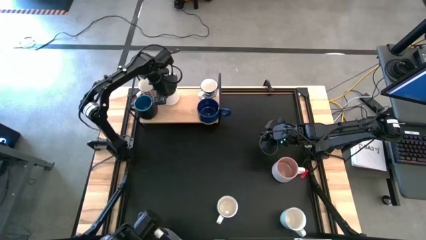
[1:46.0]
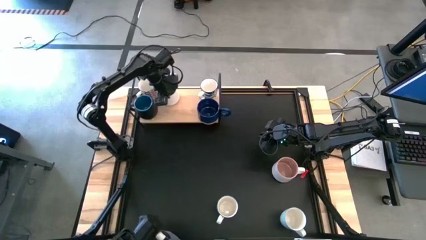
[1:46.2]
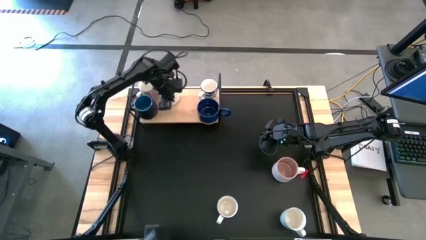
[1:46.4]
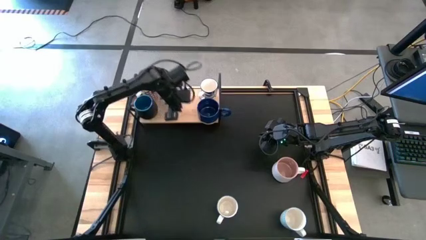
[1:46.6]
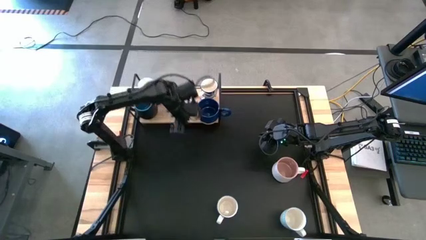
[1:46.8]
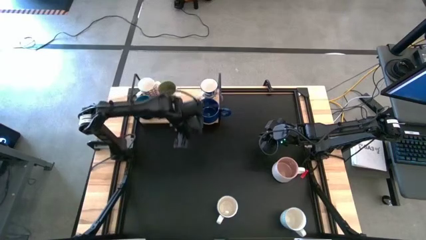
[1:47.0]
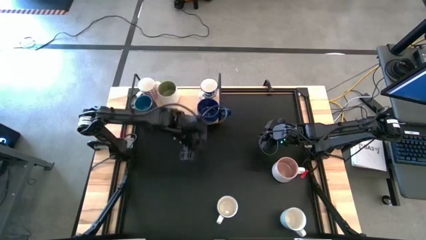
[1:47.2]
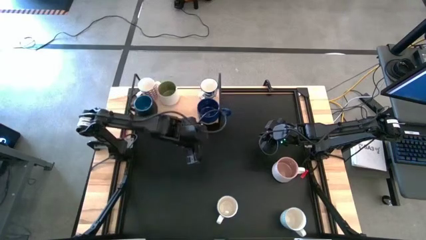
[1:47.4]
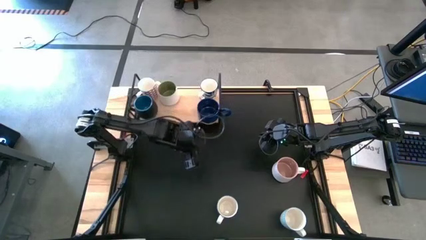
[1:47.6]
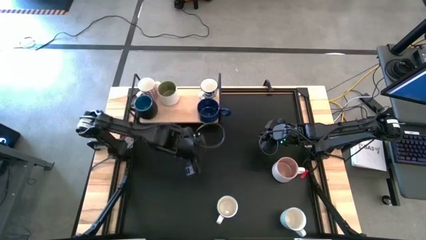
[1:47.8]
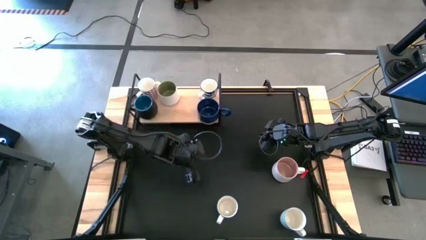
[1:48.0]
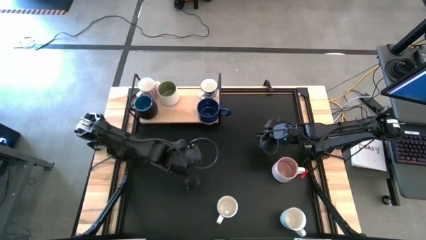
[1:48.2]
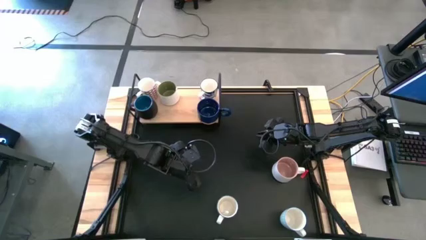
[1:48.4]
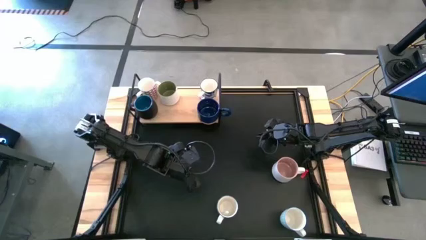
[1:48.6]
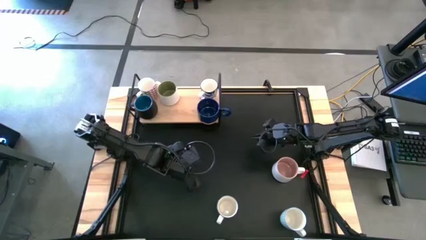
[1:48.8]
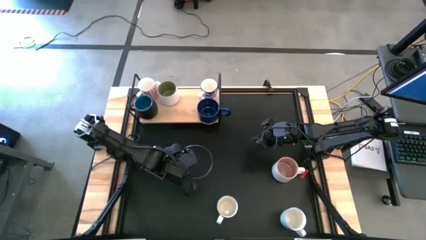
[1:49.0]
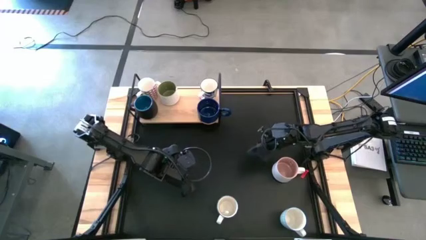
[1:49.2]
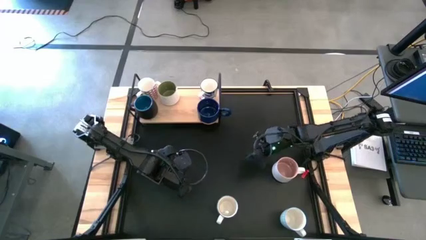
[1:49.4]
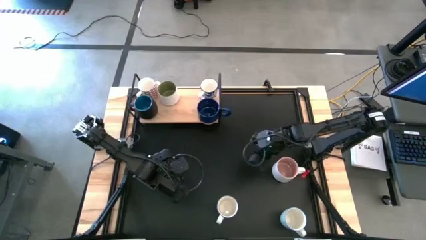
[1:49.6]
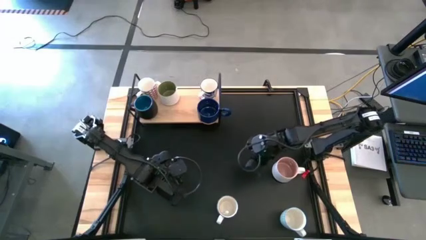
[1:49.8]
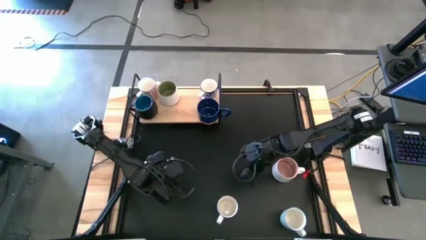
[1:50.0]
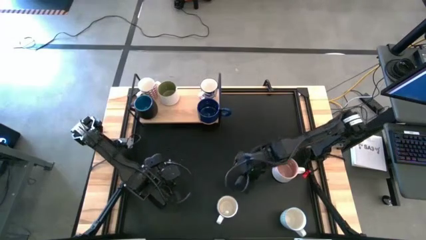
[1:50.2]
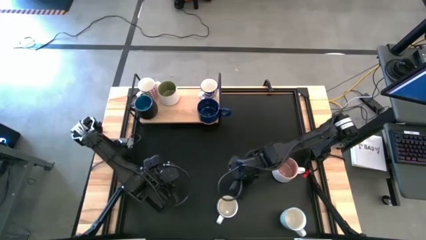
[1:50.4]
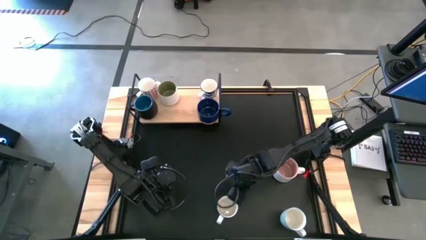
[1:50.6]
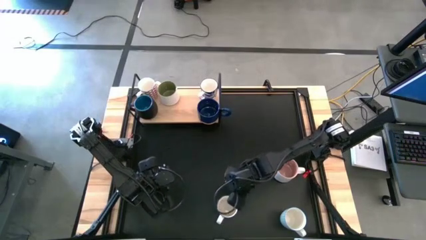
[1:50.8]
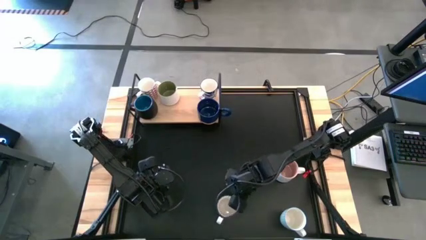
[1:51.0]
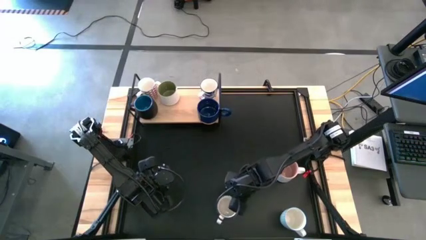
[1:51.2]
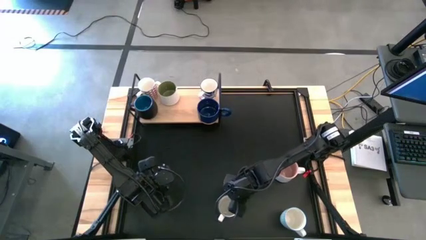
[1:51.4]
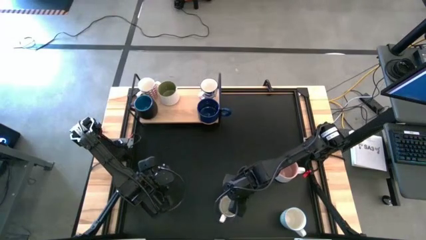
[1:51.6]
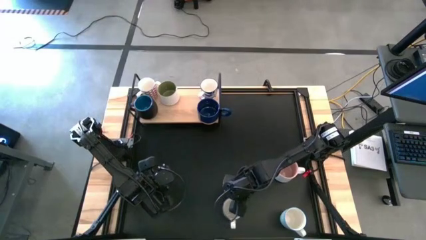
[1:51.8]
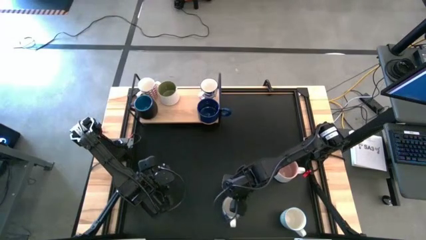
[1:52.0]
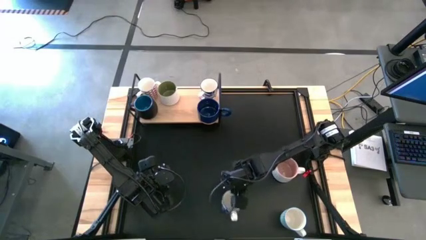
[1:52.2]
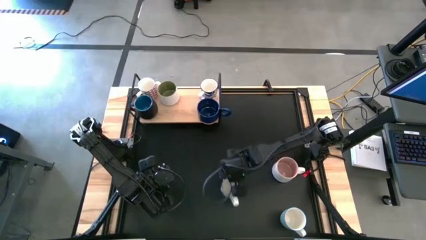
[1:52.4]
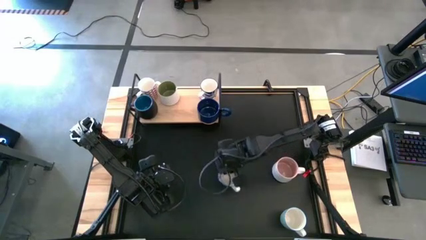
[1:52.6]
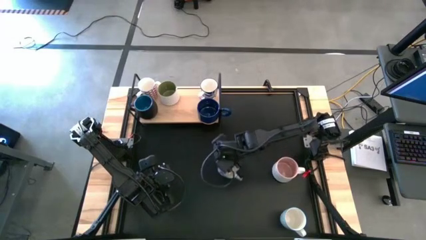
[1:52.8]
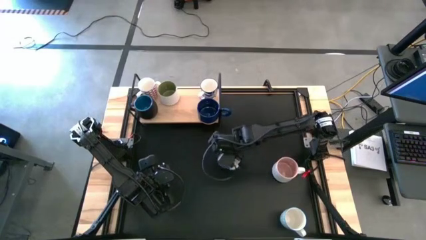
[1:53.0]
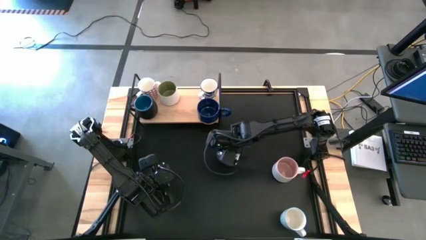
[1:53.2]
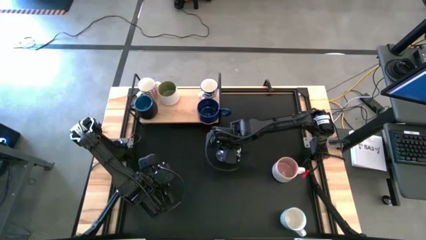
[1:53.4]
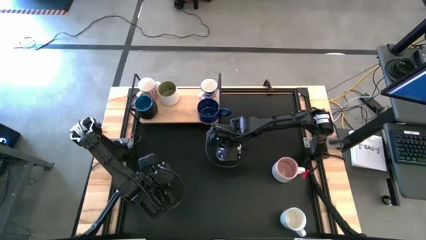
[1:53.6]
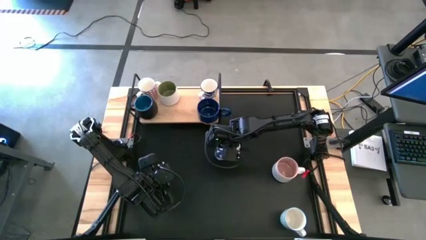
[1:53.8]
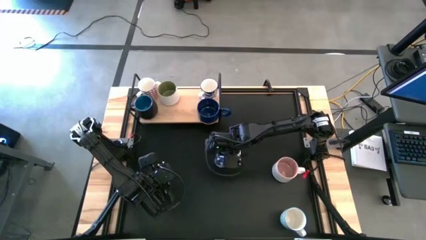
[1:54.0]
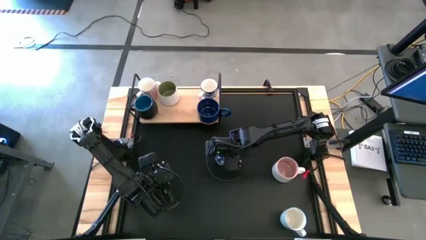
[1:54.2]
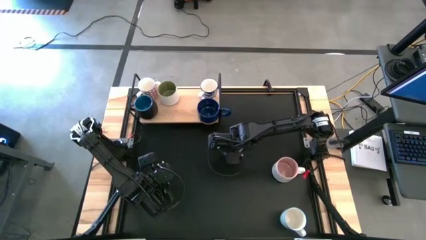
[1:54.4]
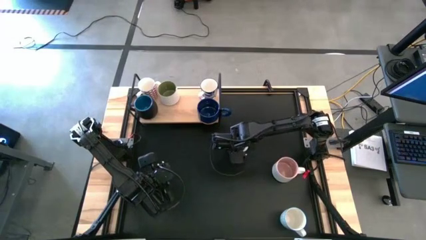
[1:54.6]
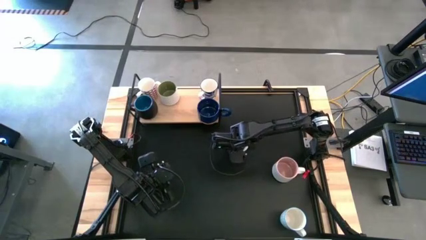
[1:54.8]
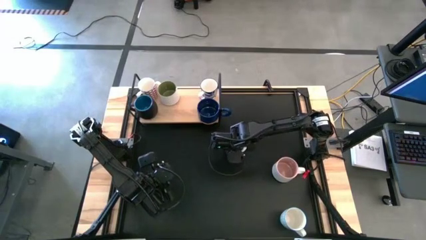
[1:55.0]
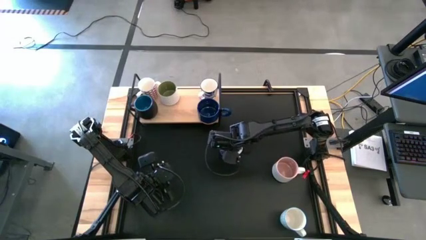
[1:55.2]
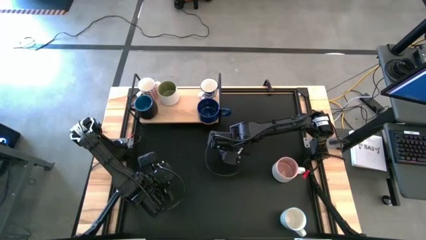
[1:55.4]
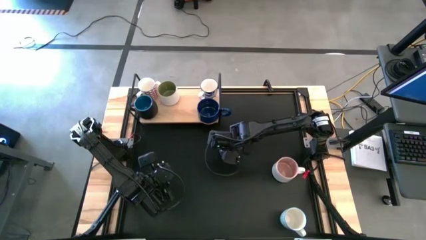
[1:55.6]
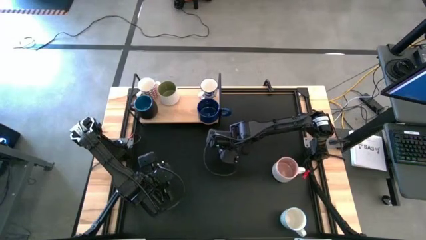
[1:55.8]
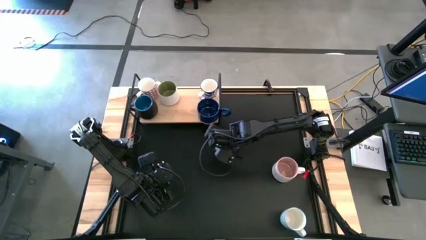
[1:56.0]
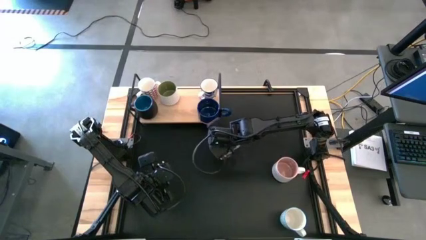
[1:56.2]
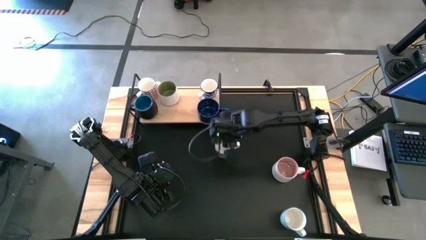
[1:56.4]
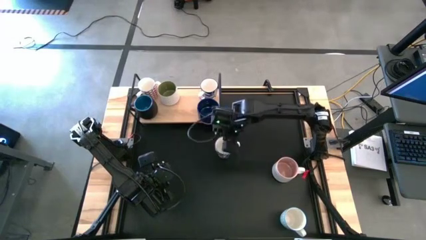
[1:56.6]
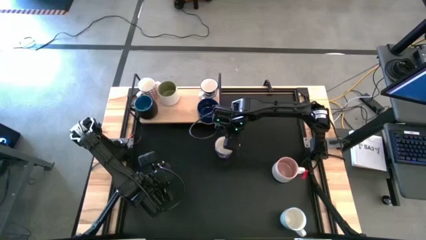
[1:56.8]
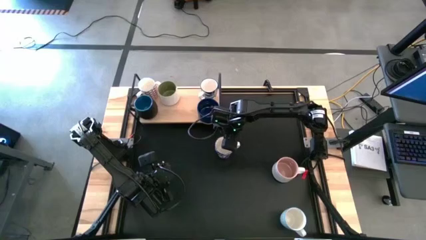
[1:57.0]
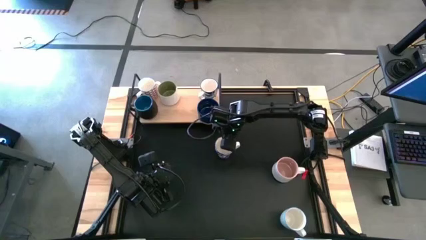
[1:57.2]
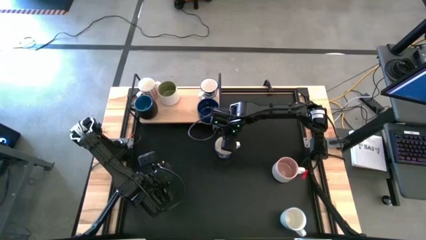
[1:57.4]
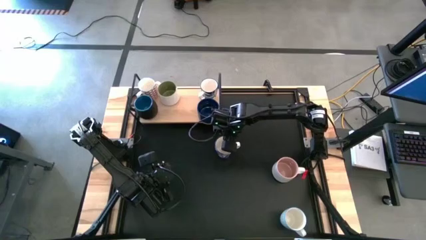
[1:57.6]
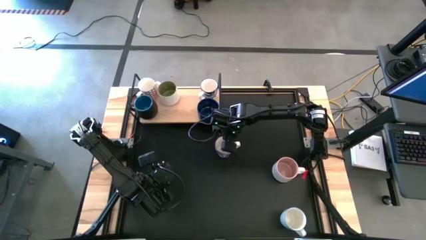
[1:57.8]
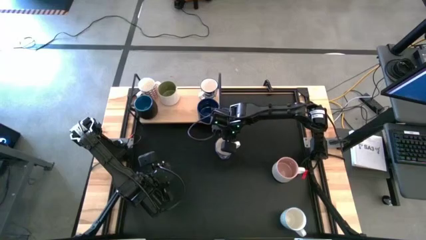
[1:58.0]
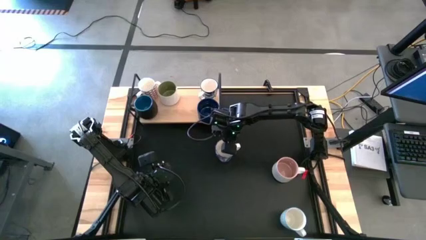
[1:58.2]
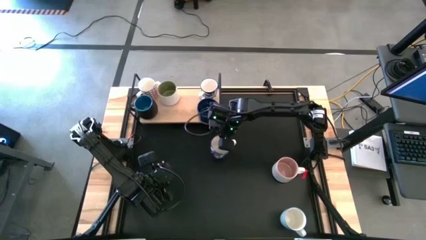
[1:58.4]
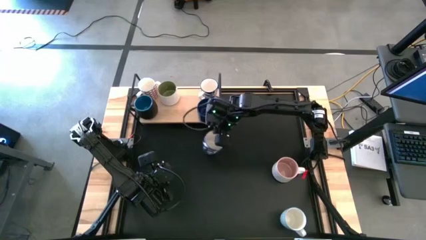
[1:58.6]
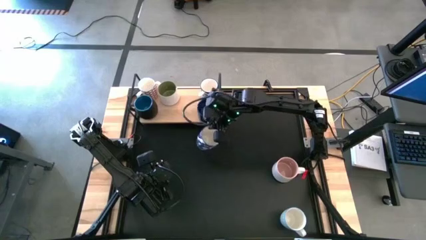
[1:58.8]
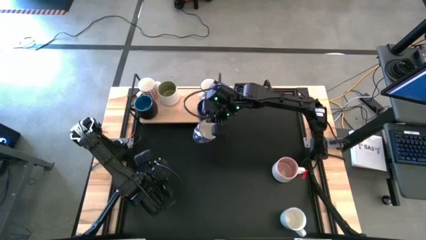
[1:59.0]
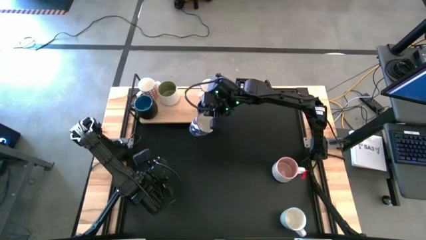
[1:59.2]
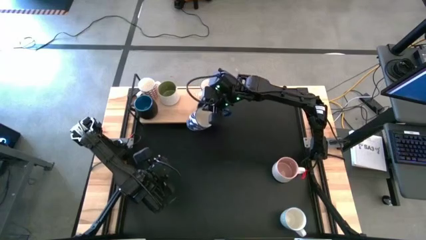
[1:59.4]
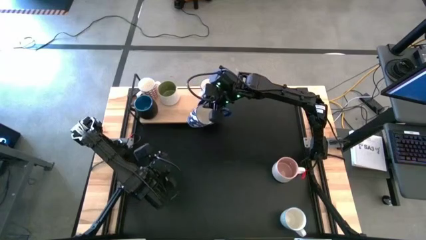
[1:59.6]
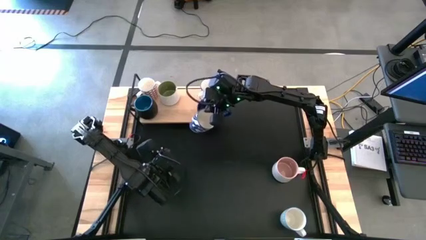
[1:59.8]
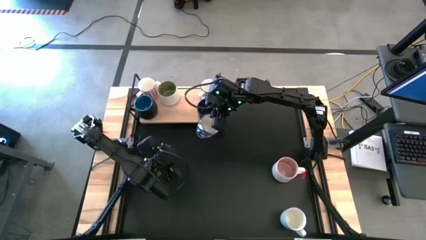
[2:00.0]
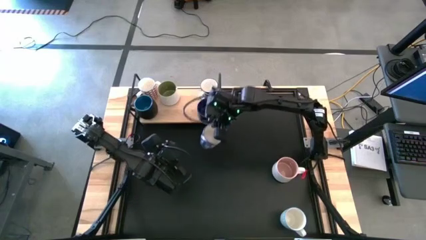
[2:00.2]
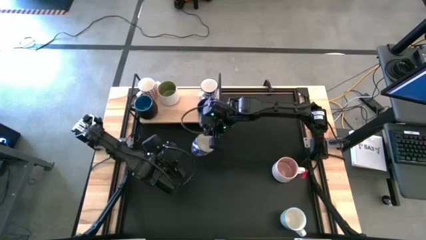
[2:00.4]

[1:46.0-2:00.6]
Task: Place coffee mugs
Put the blue patterned mug on the shelf

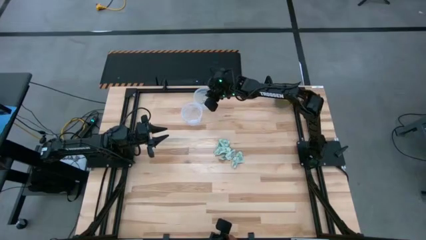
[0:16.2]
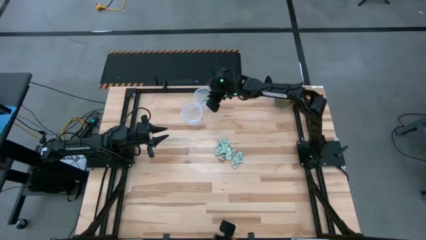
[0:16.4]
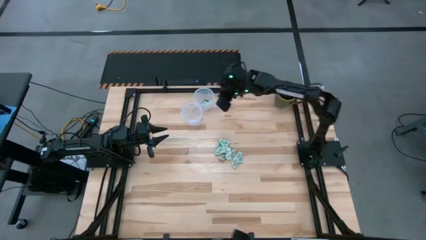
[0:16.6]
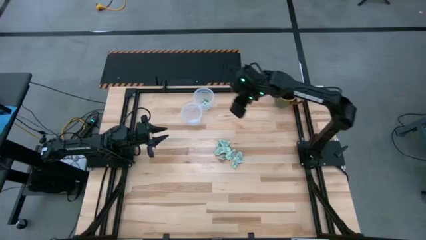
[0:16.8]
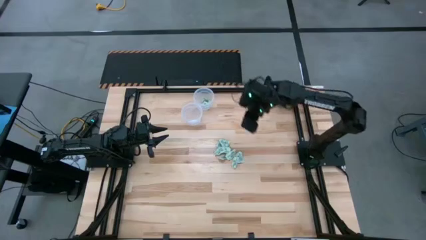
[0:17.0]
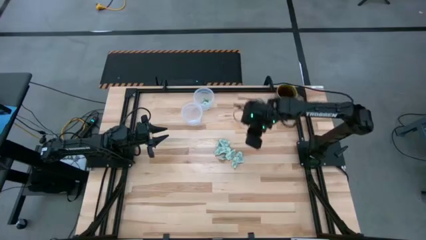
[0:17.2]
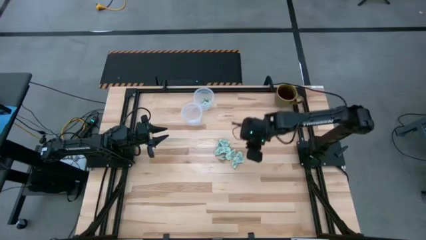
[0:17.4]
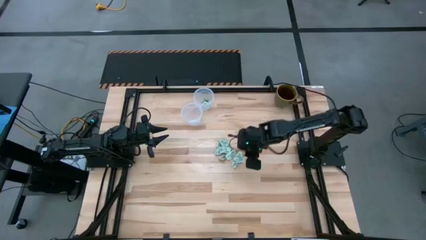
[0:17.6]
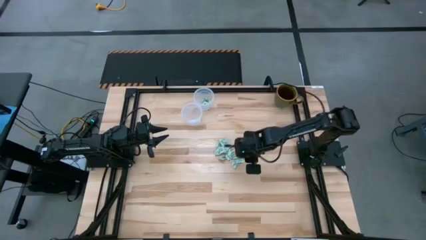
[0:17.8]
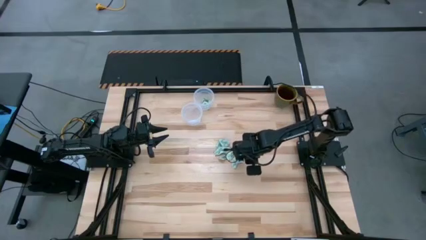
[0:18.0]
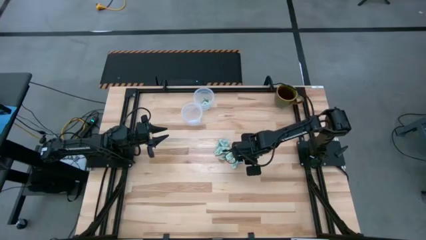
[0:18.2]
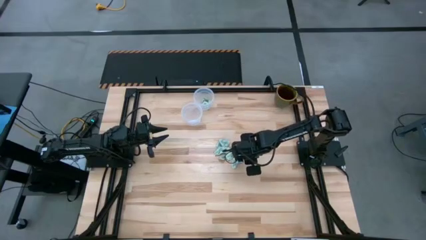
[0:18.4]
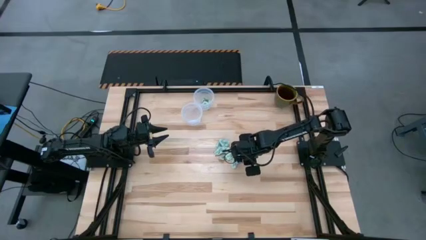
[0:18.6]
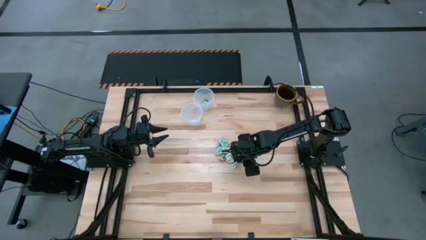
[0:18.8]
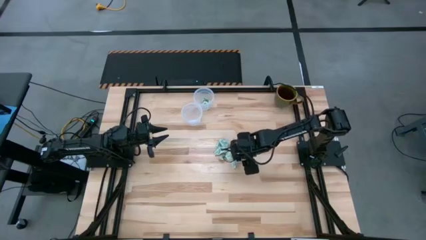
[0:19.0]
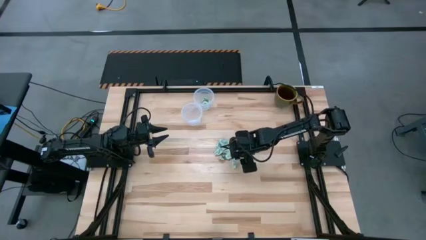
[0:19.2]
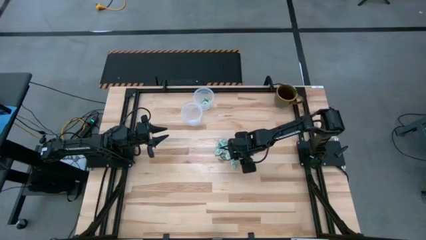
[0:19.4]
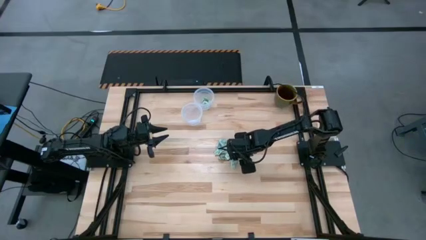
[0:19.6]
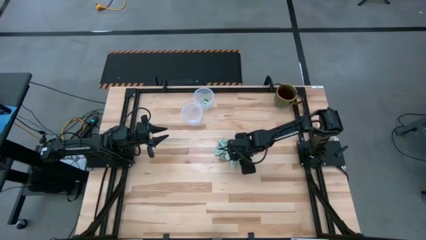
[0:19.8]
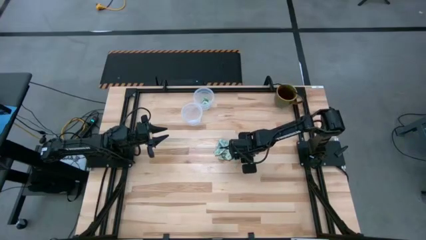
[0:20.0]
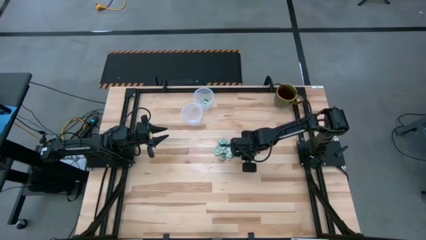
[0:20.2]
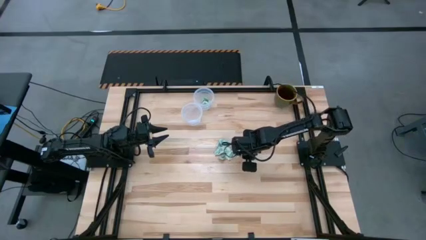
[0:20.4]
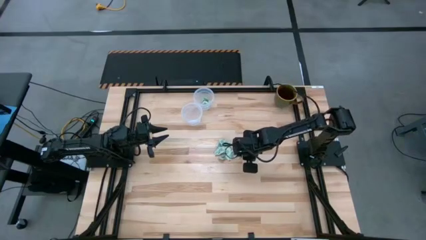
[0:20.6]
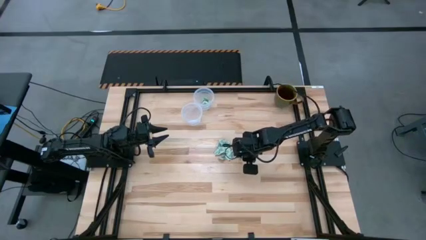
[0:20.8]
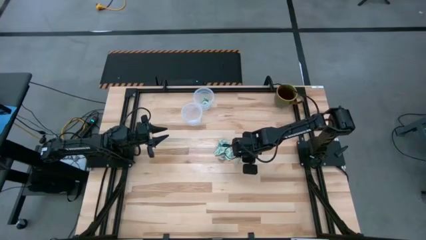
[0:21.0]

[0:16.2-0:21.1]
Task: Pick and place items into bin
Put the stevia packet into the top bin
